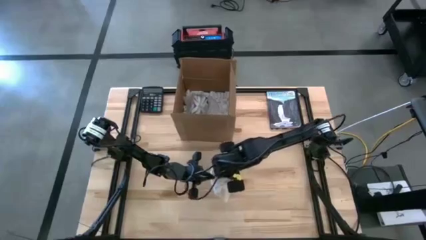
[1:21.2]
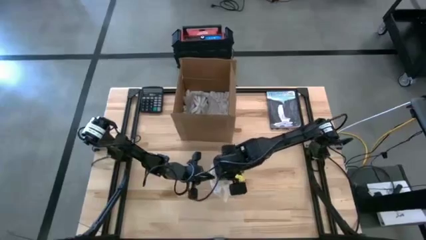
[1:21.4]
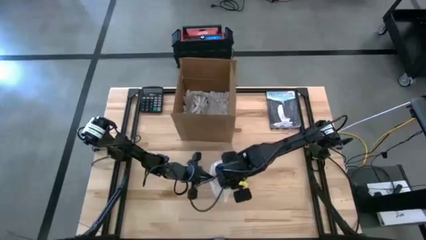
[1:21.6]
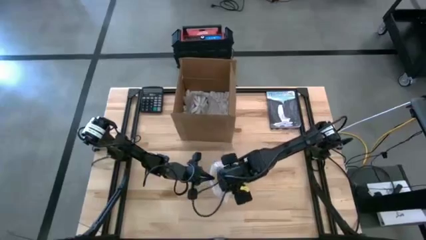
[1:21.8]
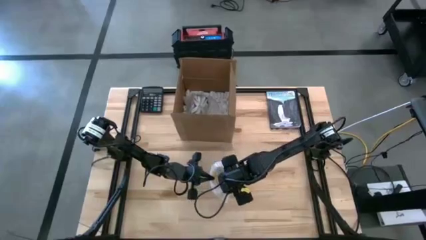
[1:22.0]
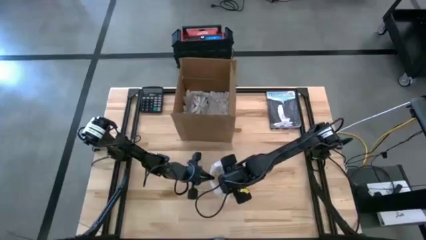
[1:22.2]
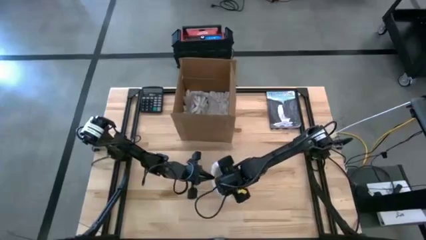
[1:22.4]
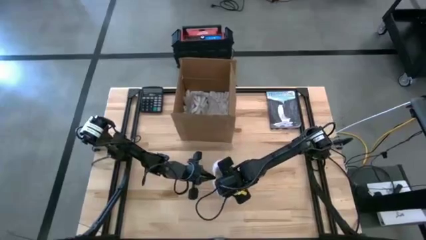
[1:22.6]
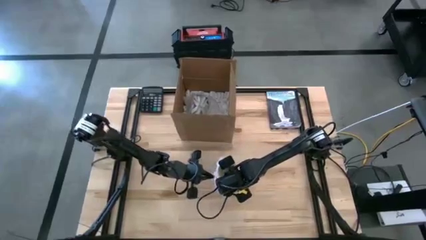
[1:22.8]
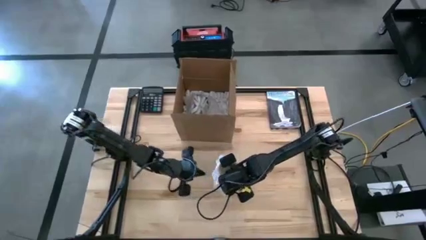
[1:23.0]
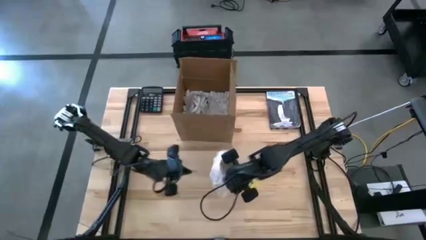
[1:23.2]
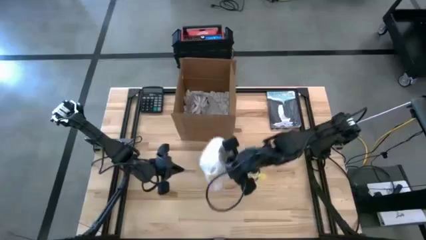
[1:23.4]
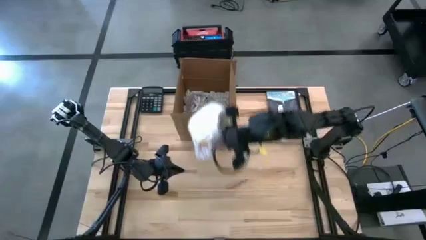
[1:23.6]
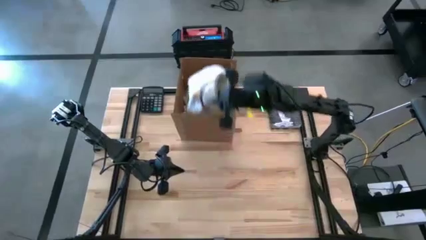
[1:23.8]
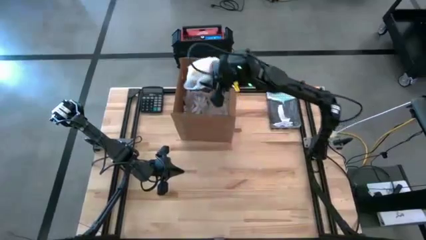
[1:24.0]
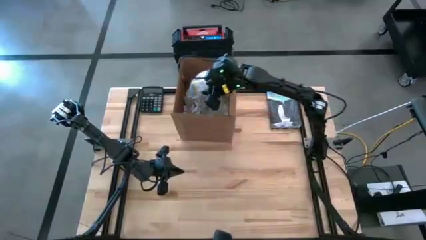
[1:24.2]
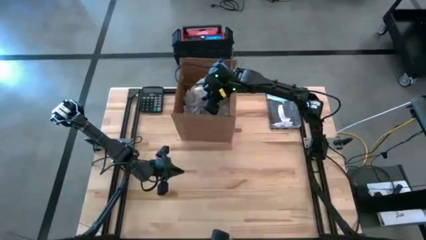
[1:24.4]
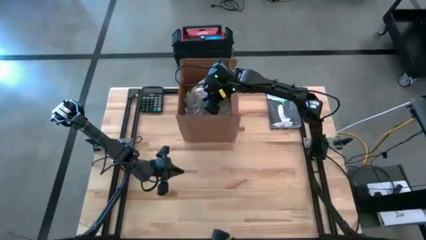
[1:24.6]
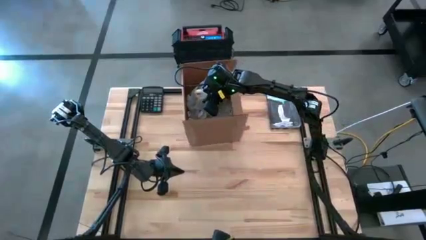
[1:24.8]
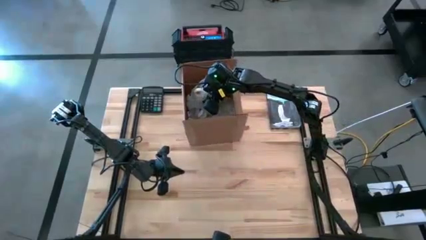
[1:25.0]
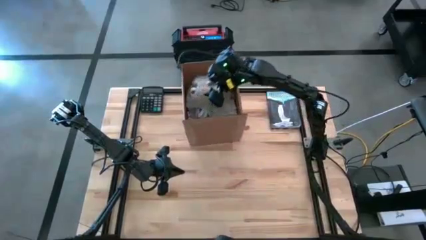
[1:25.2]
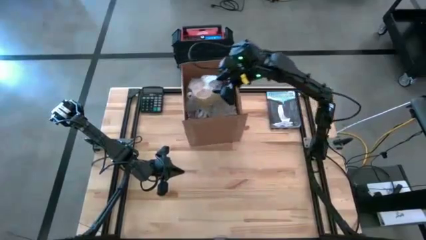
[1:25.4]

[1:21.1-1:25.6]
Task: wrap mug
Put the wrapped yellow mug into the cardboard box

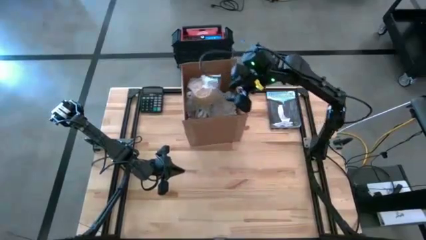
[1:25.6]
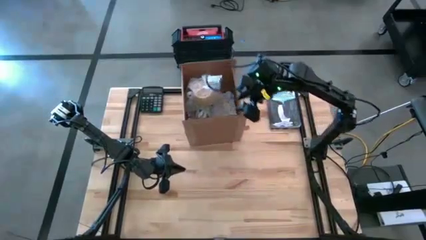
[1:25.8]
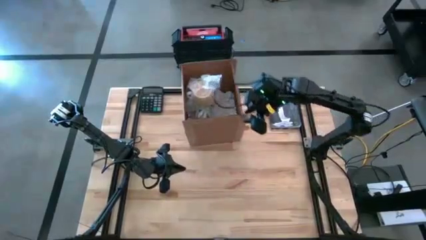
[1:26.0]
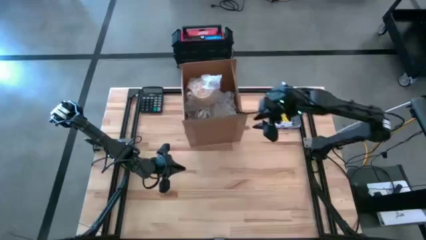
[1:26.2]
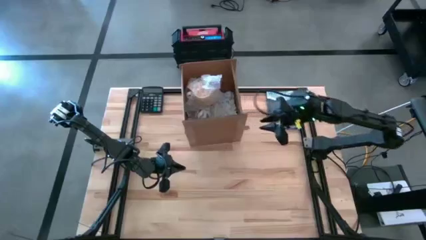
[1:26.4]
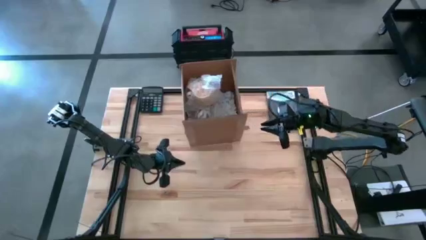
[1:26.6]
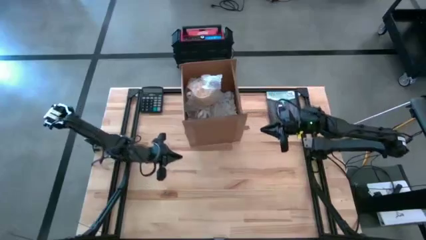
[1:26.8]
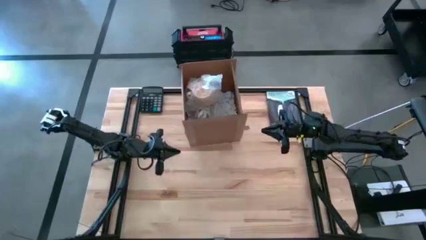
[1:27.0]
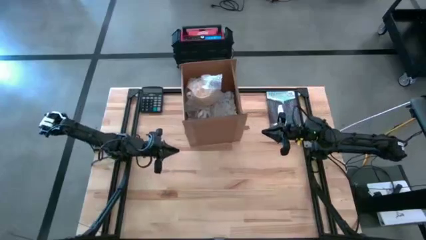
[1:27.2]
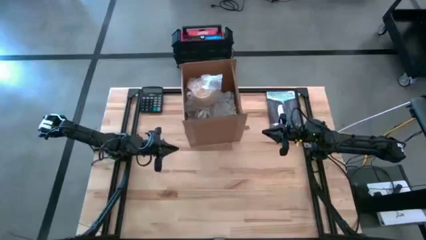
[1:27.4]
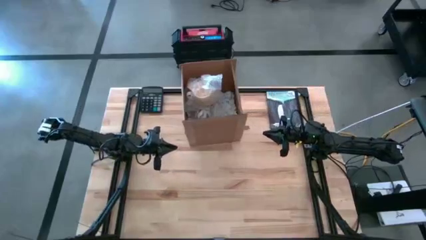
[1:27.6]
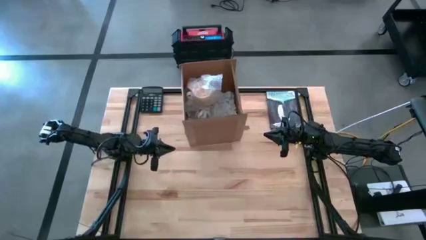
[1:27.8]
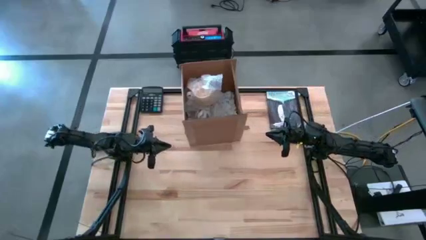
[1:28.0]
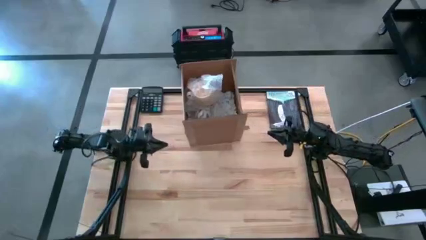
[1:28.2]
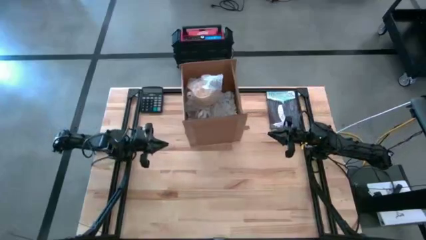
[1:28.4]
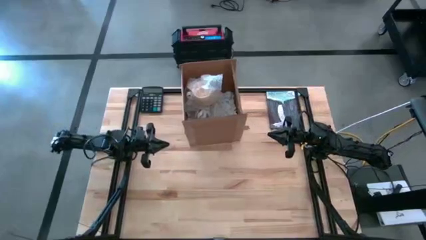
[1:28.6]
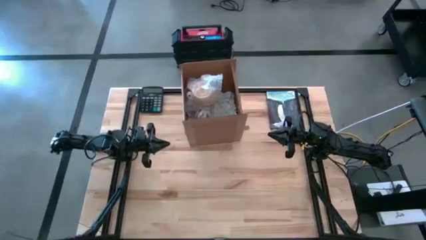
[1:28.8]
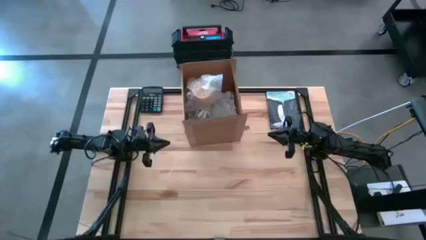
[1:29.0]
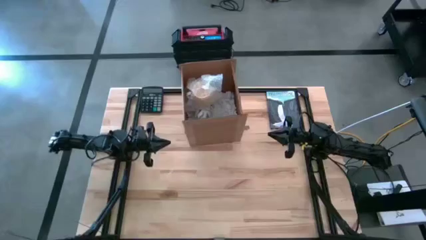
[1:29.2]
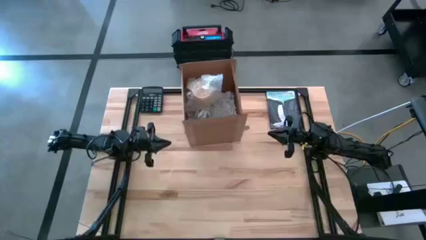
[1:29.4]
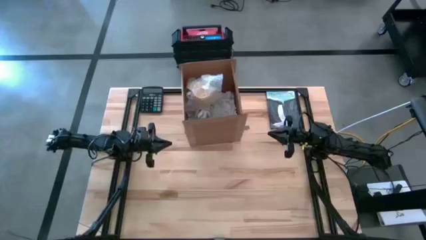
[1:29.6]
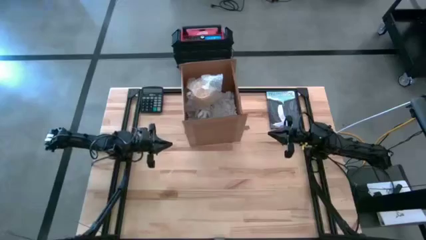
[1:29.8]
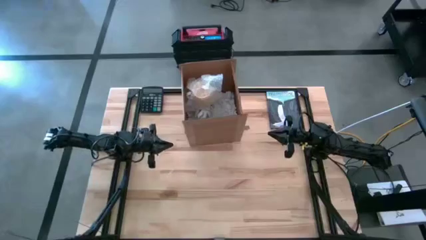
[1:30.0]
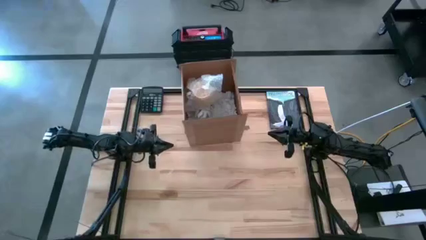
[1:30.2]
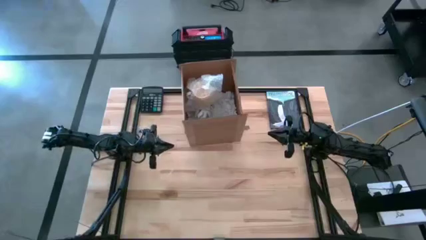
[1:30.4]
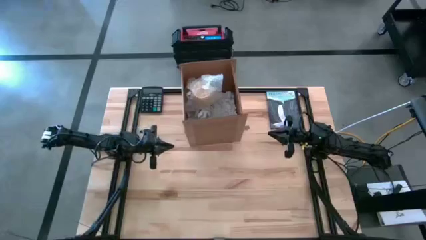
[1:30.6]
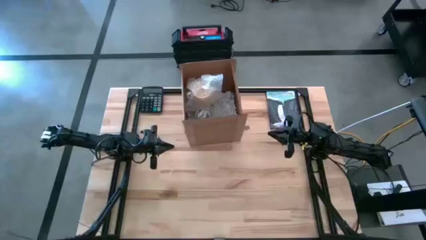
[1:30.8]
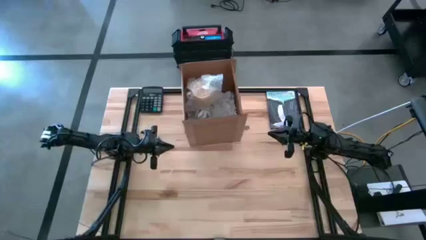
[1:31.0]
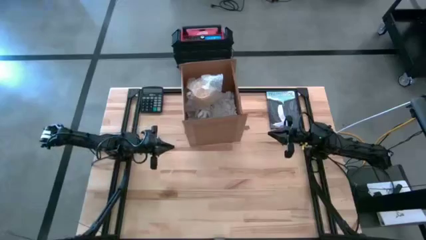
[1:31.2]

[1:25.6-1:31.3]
Return to Home Position

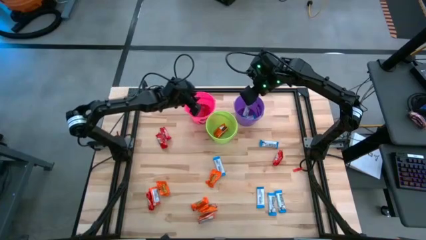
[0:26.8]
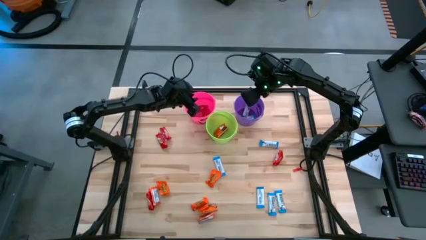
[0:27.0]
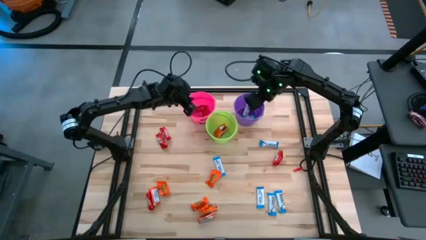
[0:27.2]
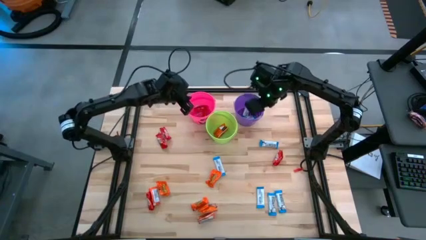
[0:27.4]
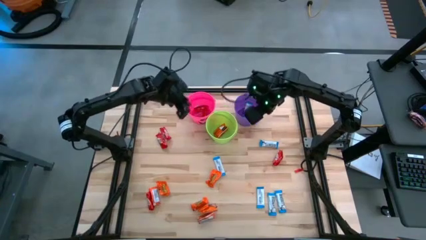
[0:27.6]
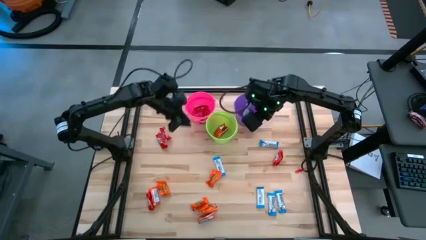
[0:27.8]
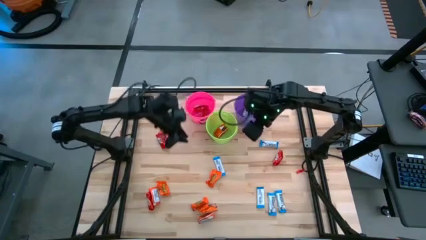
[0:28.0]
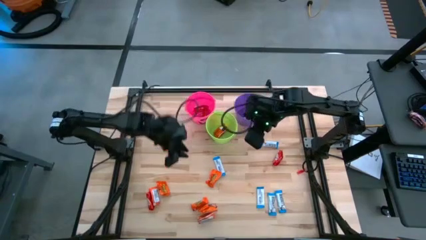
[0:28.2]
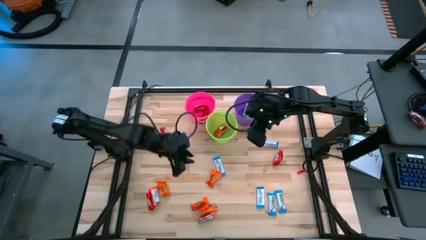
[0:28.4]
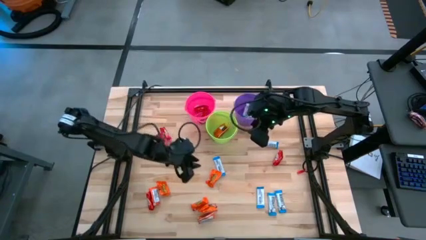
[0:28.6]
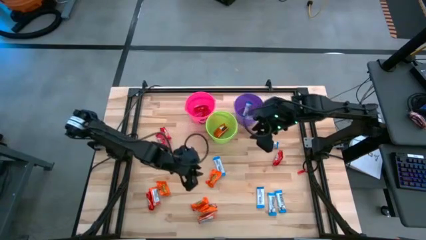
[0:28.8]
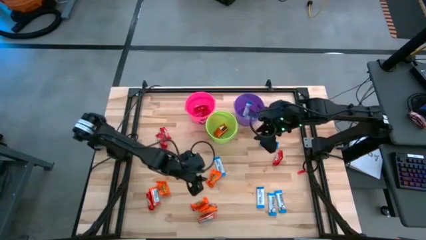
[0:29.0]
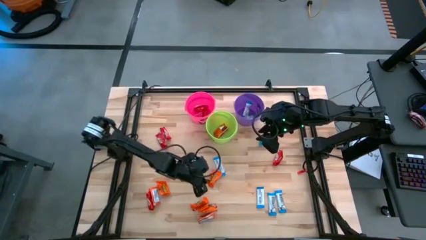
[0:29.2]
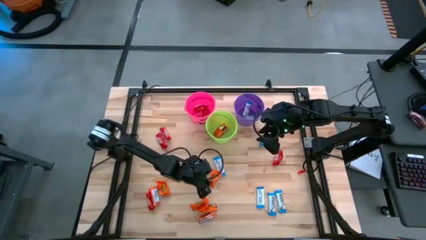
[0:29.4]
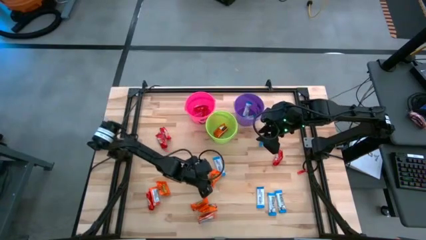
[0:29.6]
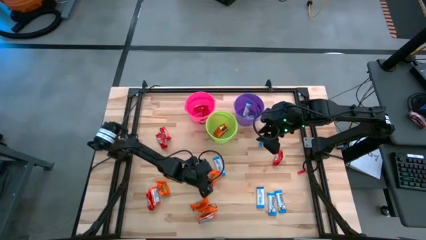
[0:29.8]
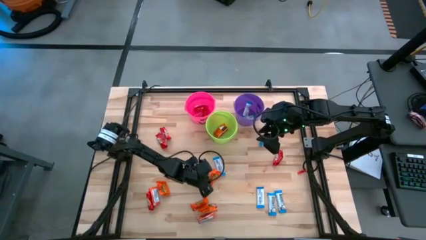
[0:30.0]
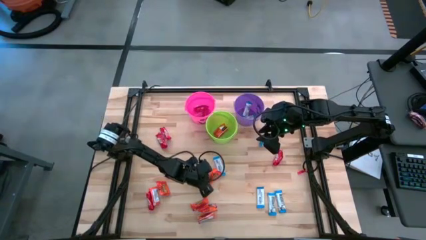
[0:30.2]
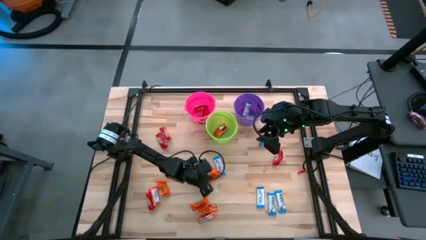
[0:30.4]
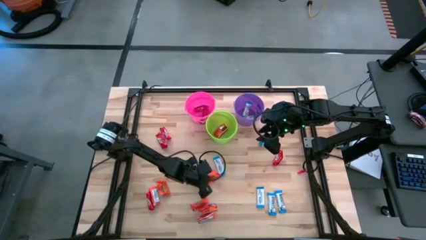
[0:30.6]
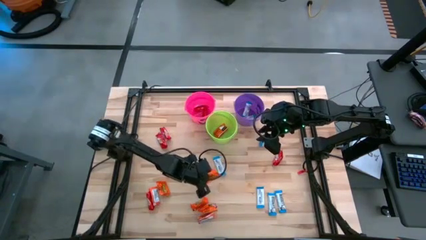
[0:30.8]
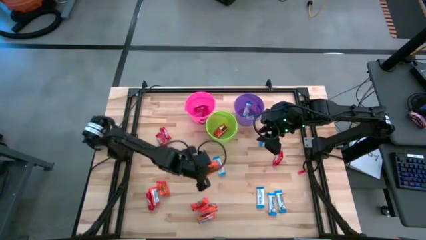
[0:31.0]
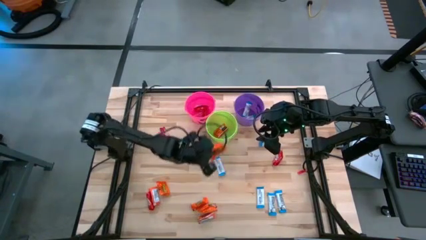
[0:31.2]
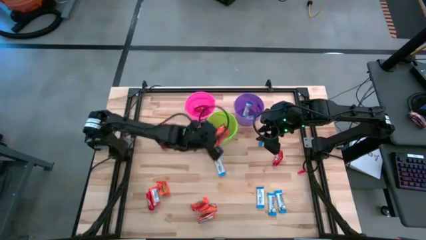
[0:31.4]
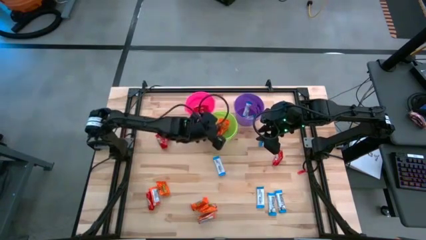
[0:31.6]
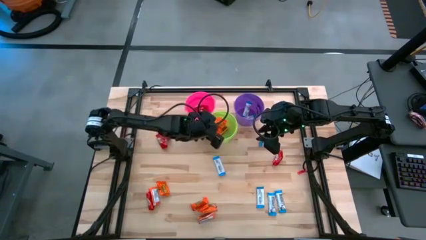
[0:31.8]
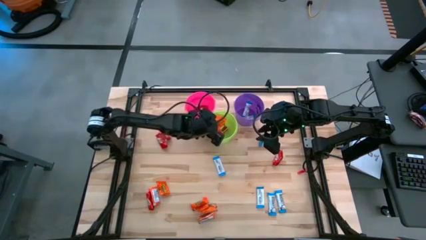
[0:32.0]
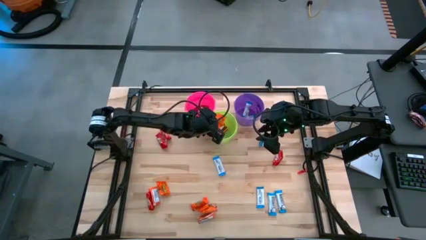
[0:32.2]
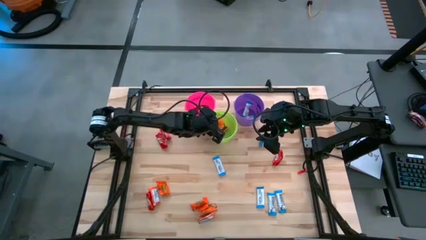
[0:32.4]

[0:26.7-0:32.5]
Task: Sort candy
Put the orange candy into the green bin

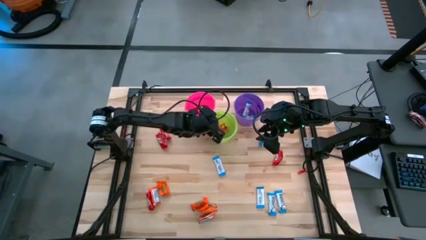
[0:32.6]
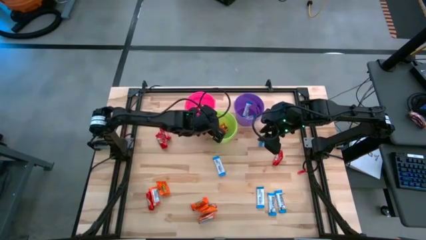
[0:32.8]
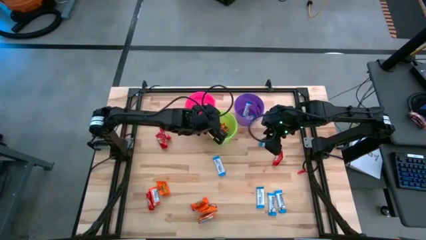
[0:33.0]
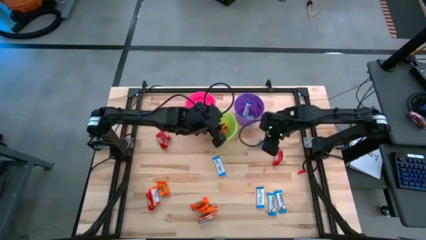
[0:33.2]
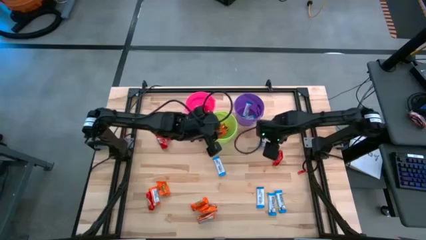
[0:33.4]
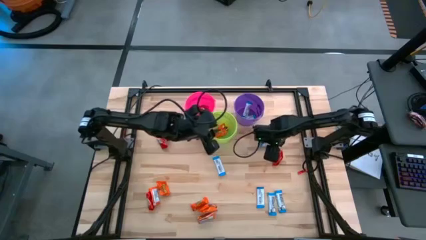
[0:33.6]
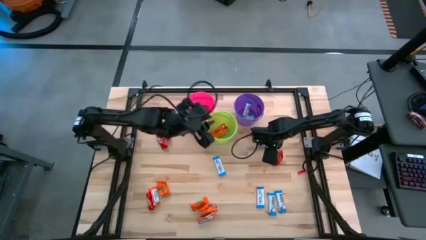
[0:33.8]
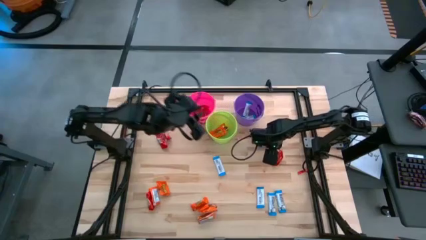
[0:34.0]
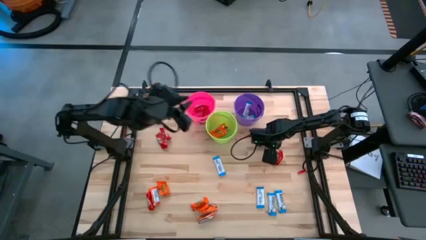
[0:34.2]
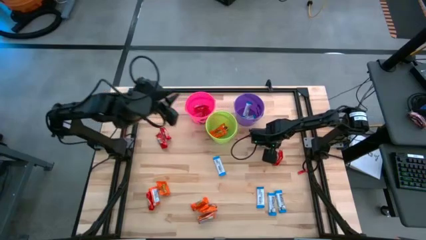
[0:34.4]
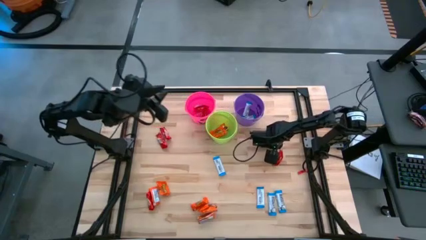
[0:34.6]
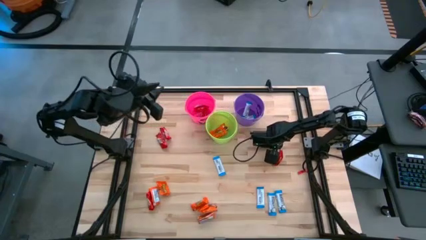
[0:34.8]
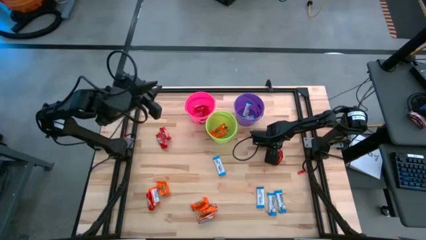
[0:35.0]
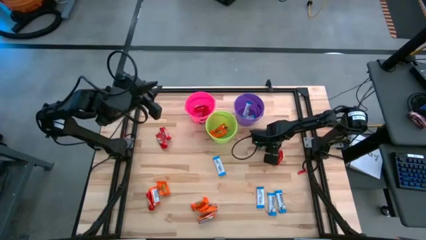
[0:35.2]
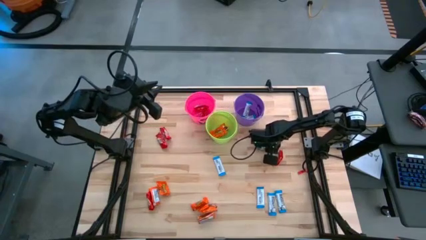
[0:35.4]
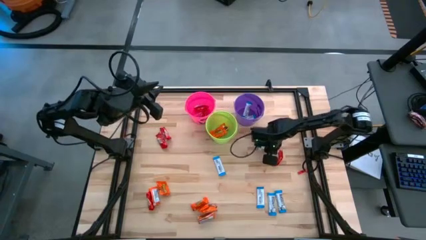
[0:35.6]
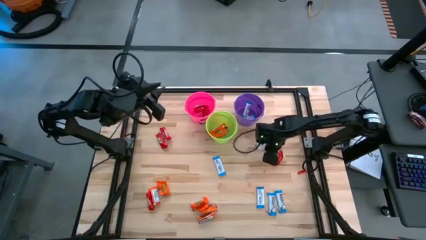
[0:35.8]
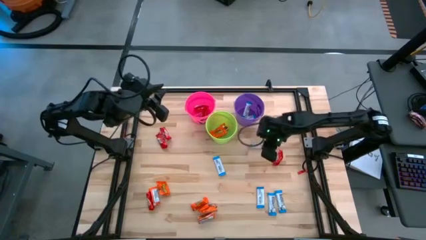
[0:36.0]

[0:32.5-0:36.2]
Put the blue candy into the violet bin
